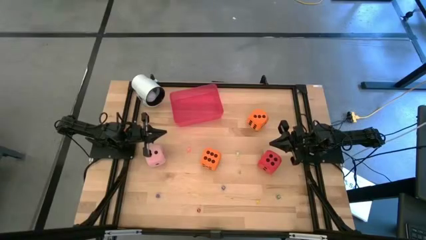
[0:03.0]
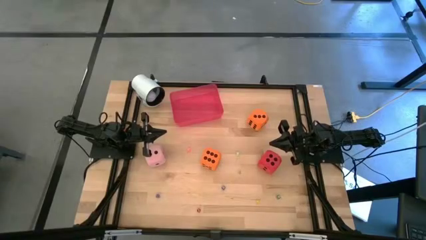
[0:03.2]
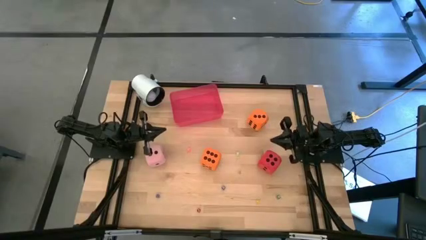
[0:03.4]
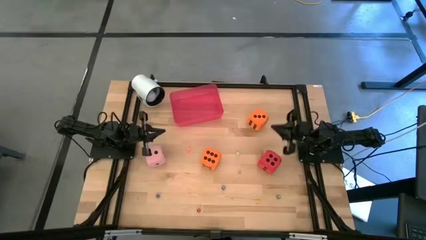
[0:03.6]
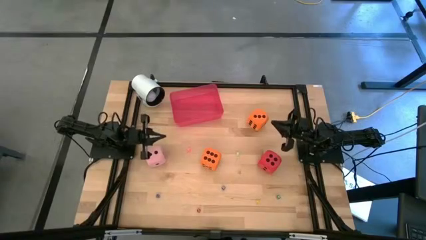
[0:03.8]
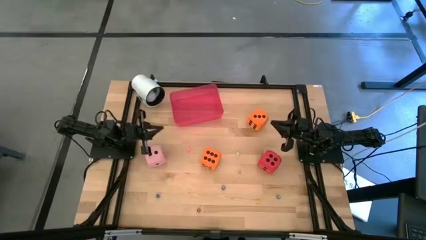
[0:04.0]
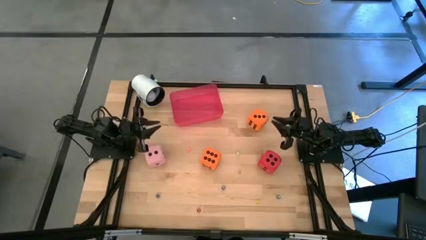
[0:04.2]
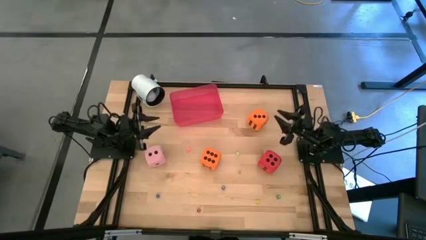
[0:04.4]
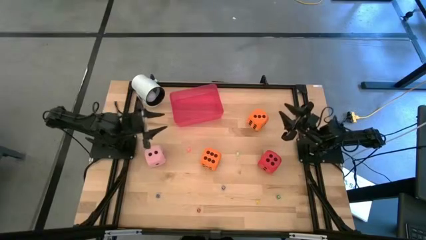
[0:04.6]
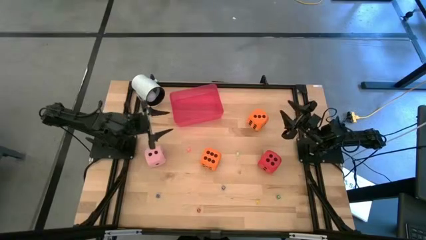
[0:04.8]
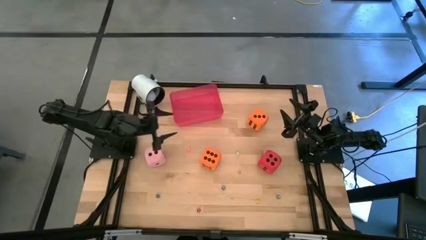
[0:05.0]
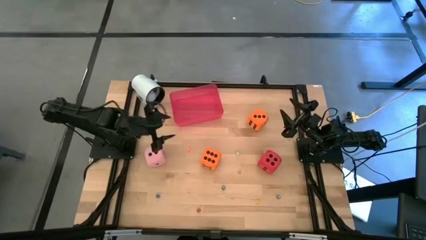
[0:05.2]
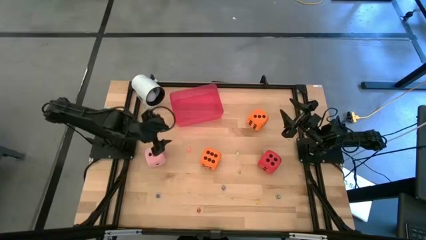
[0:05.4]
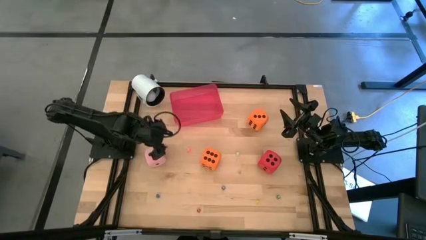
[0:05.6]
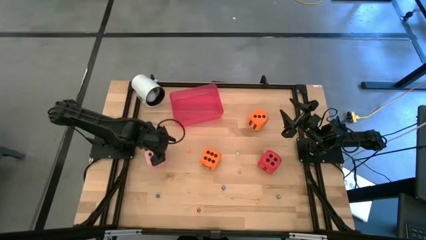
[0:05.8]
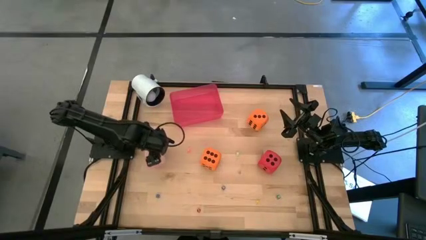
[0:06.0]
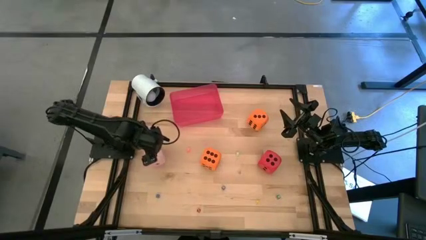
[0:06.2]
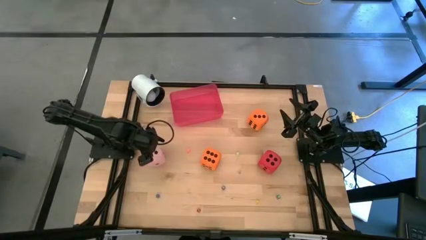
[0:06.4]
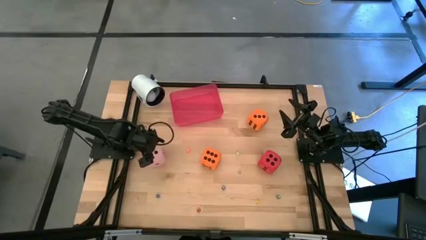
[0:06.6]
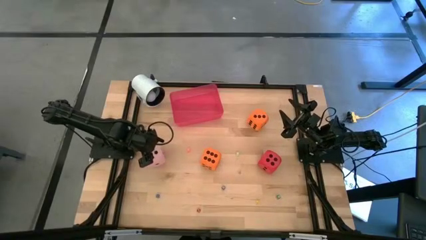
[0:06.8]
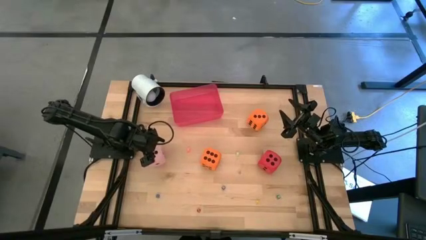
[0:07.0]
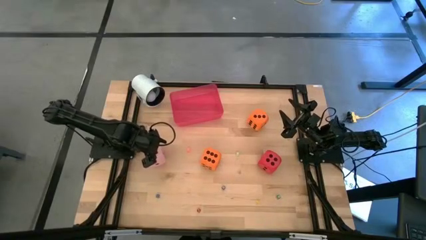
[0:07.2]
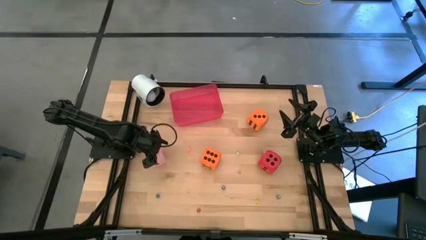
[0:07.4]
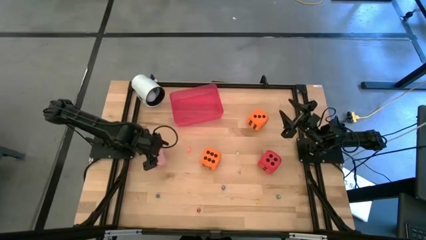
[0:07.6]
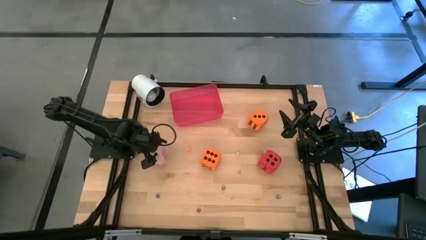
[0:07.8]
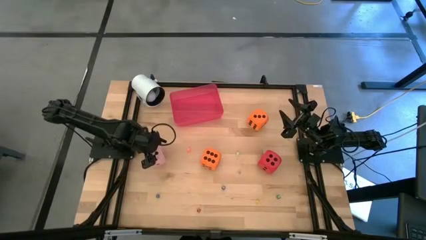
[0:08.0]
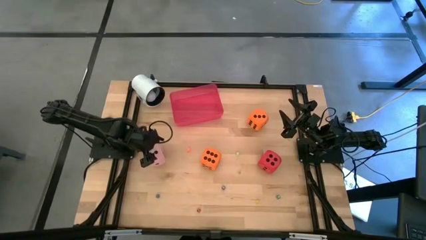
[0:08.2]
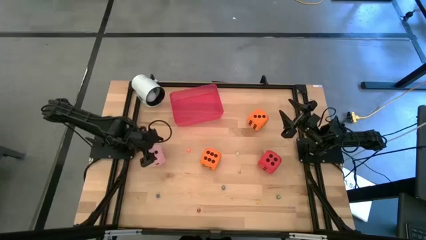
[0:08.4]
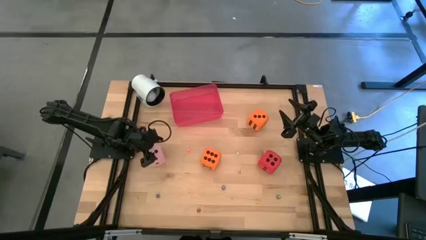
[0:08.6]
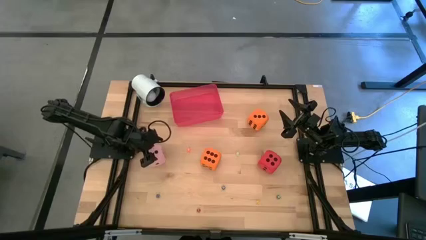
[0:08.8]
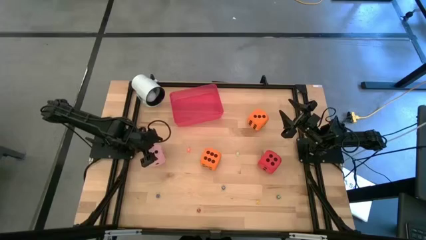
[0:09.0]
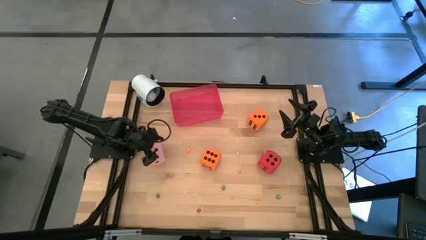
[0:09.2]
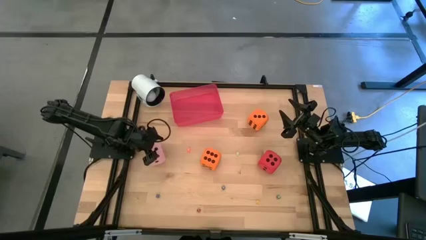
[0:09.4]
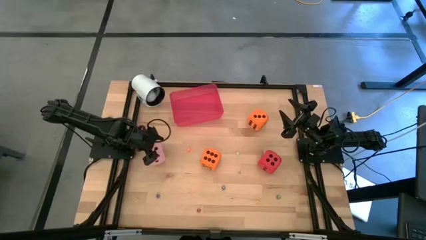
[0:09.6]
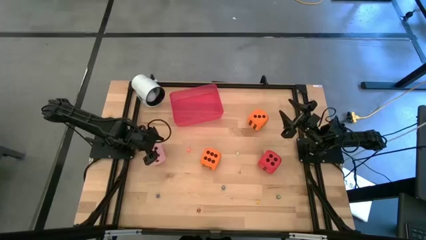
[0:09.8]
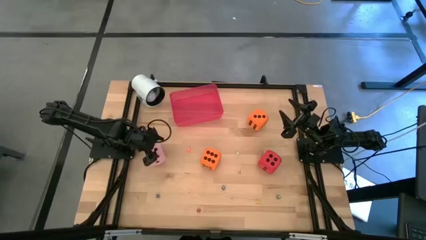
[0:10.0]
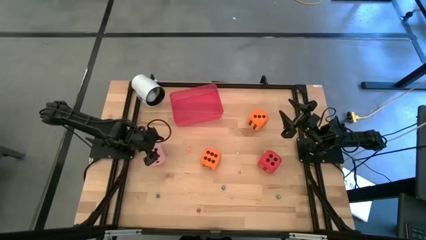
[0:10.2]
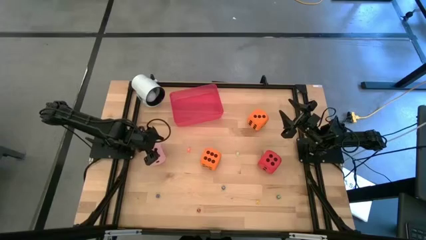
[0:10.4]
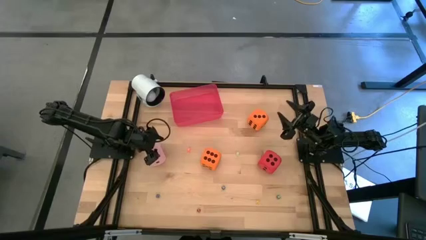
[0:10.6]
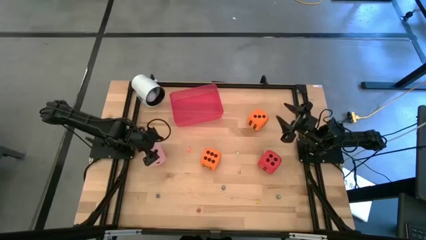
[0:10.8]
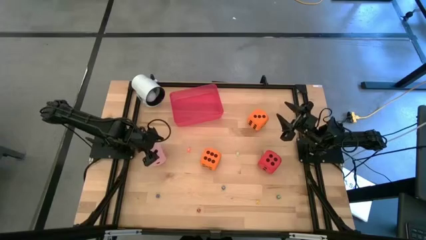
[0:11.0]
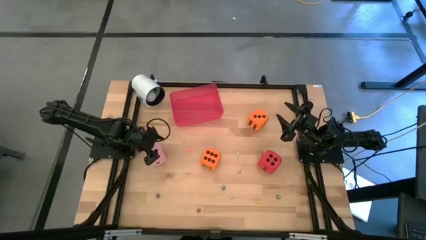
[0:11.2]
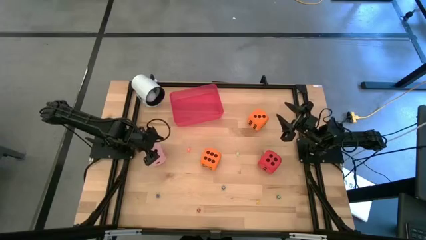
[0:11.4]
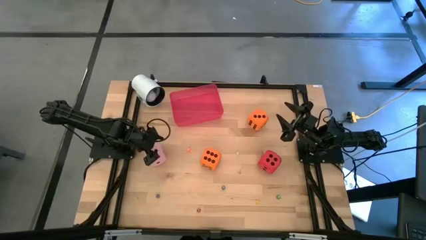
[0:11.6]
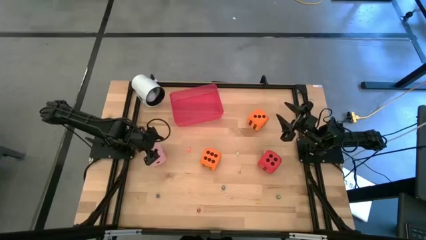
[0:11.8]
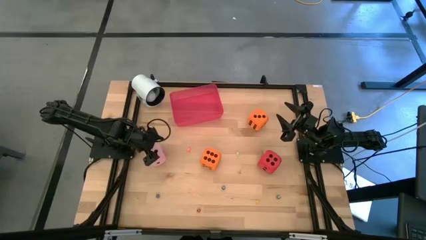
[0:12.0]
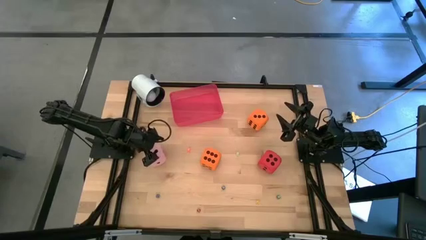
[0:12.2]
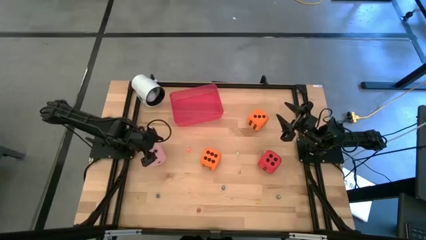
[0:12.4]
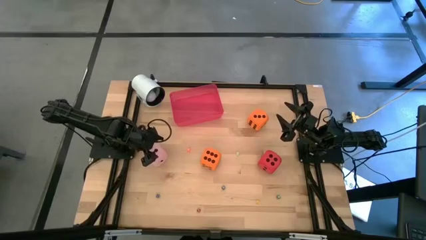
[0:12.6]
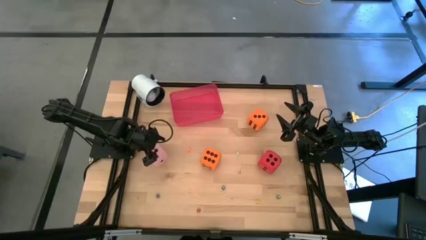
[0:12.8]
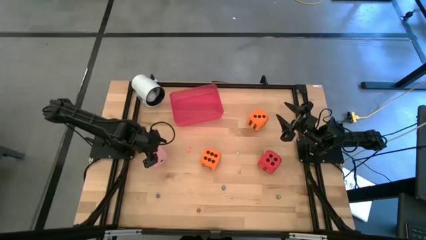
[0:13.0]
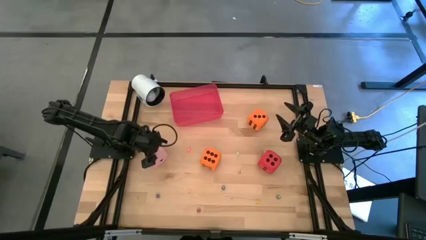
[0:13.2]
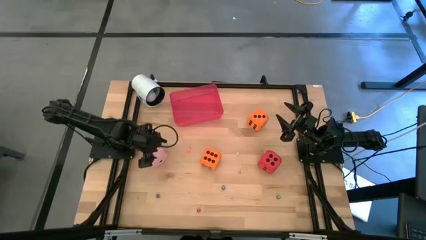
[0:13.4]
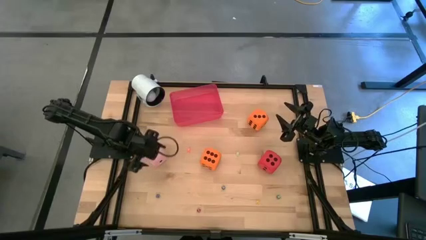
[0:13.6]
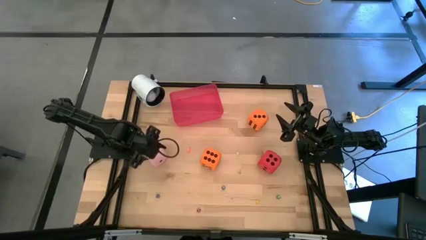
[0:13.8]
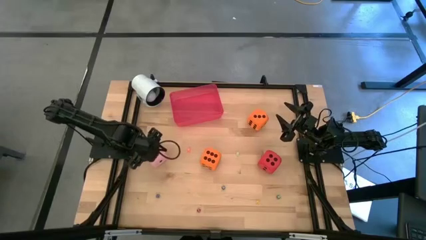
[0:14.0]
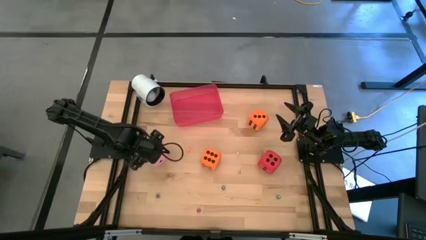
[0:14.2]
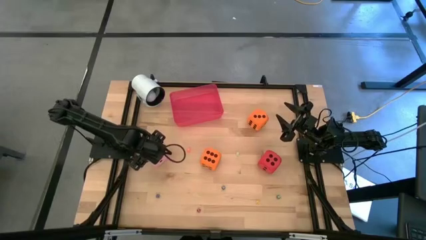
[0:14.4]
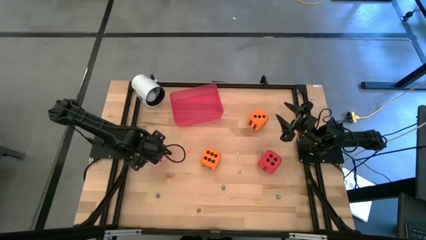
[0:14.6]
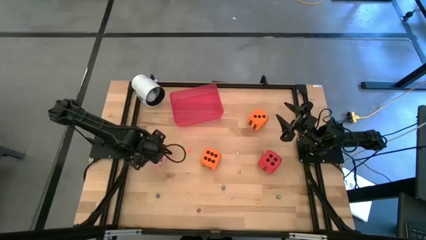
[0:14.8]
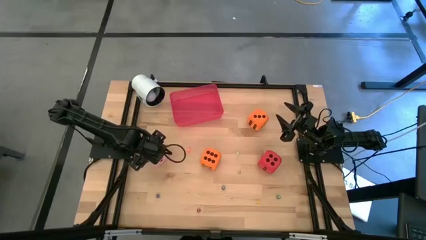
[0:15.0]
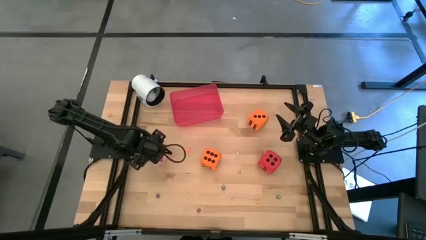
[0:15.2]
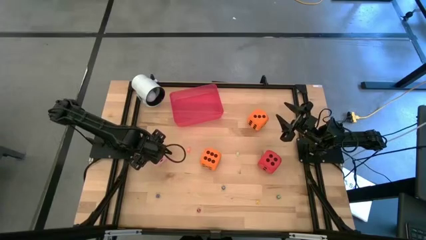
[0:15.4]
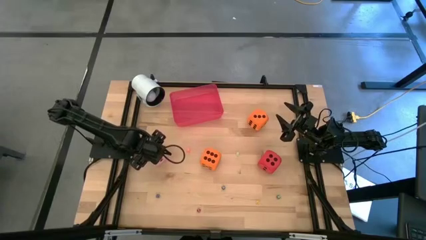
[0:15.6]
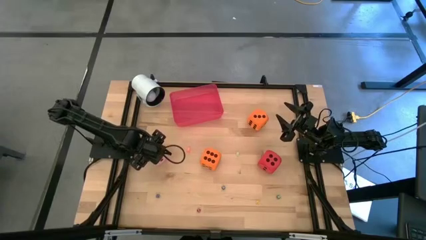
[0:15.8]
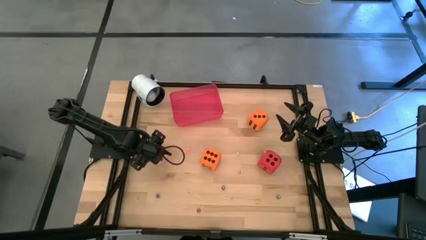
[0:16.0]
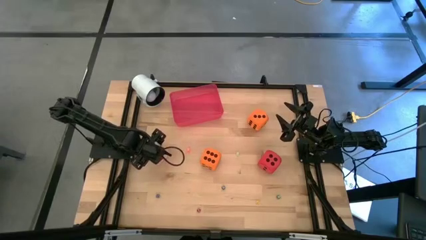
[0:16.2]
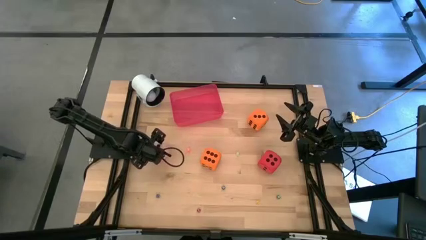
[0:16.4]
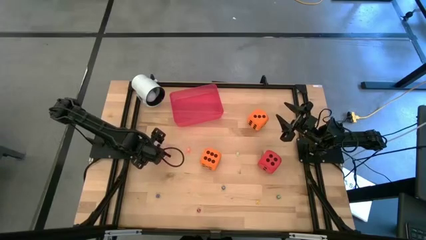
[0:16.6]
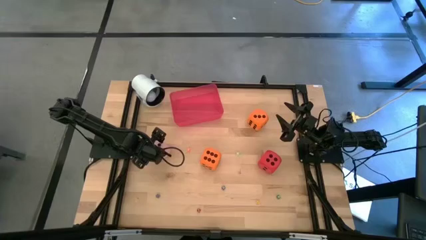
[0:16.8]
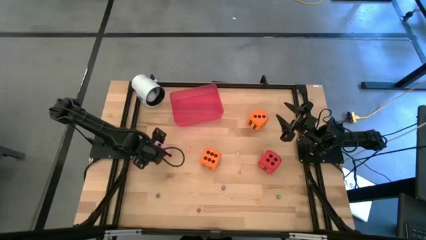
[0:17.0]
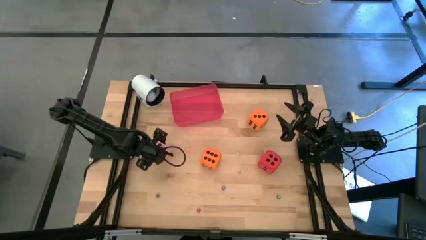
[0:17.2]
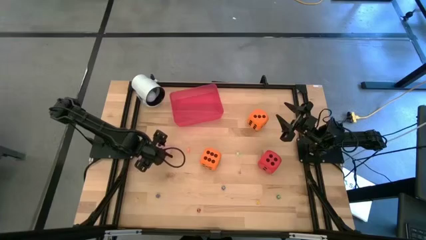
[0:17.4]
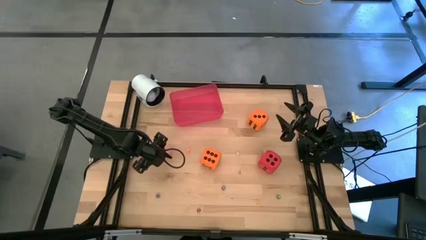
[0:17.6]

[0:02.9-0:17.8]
Task: Pick & Place Dice
Put the large pink die into the red bin
